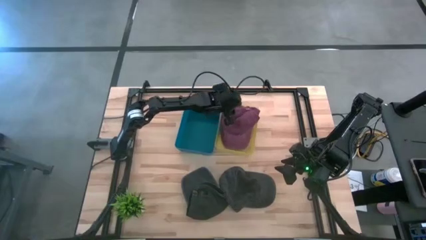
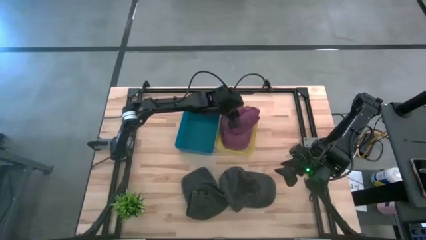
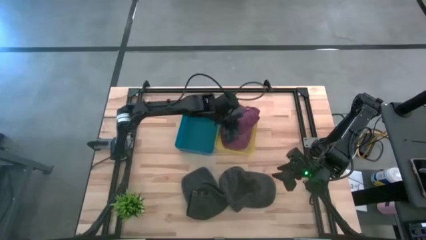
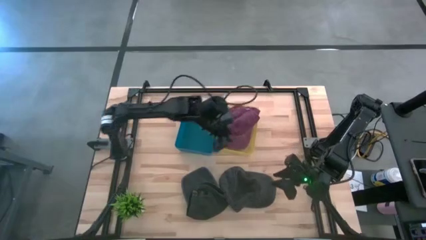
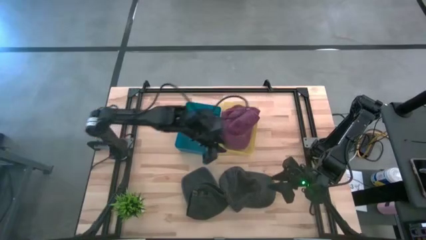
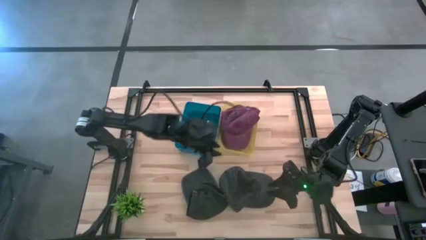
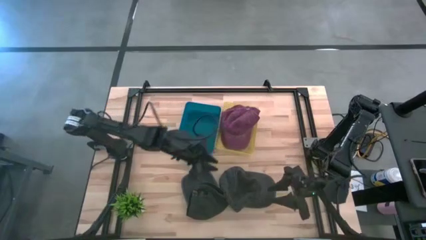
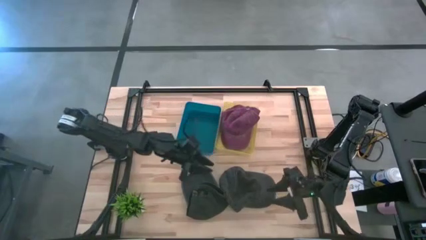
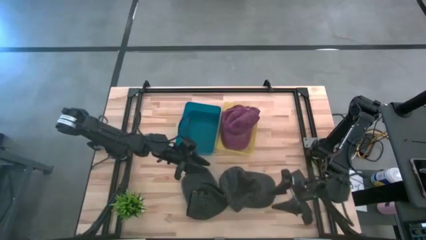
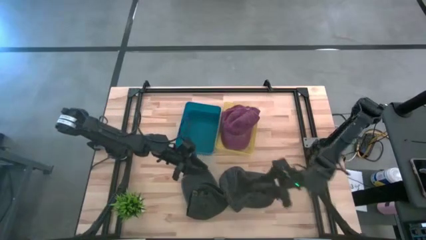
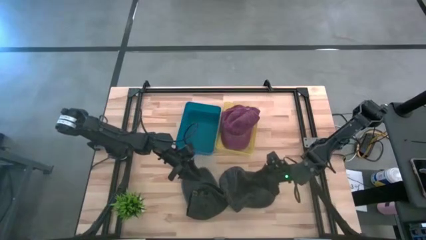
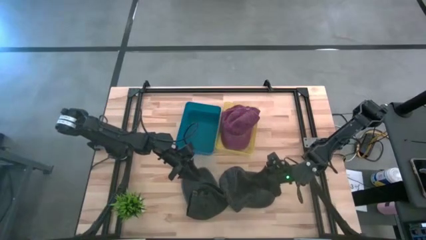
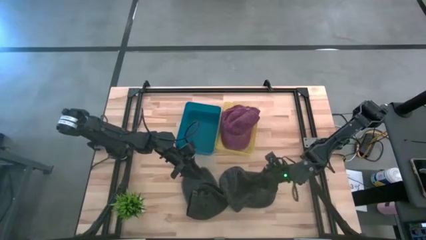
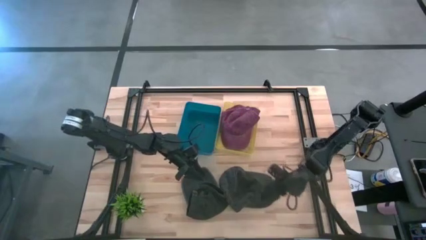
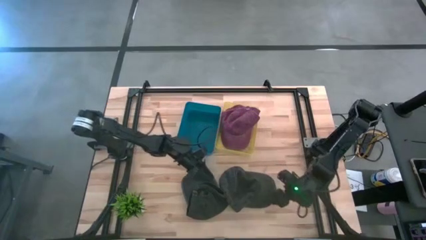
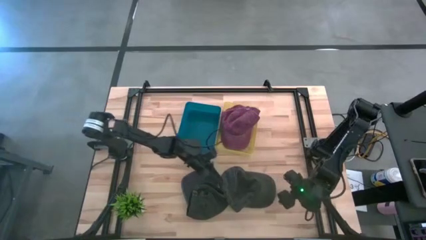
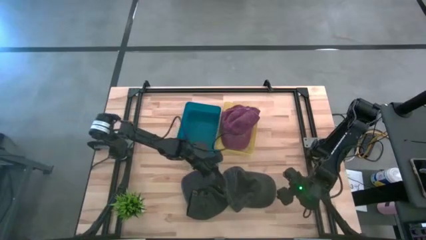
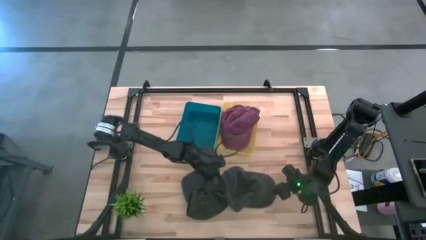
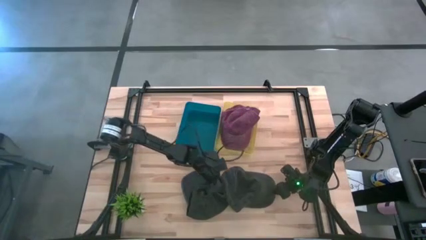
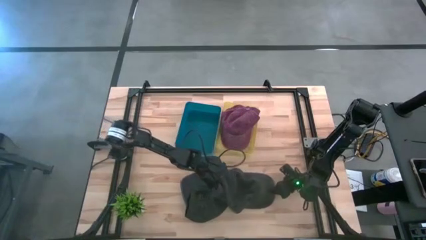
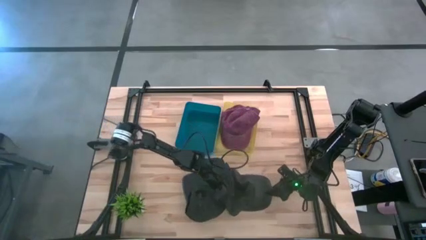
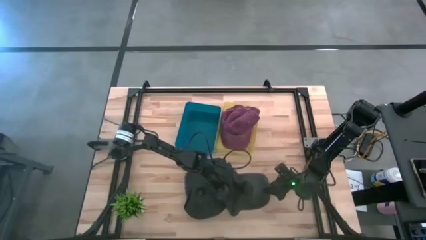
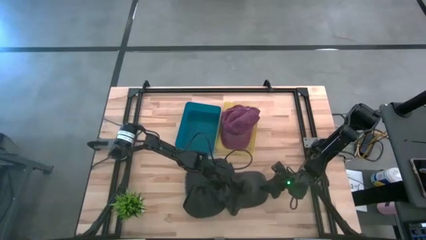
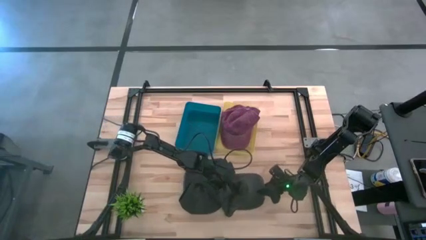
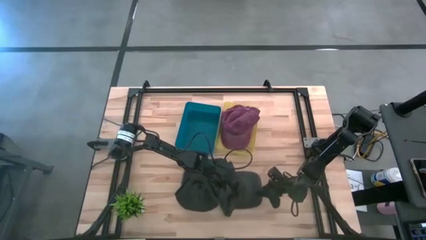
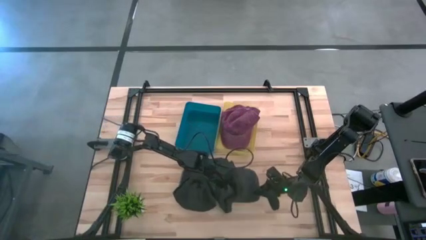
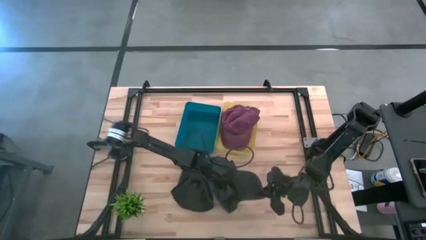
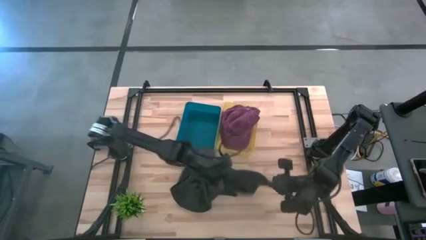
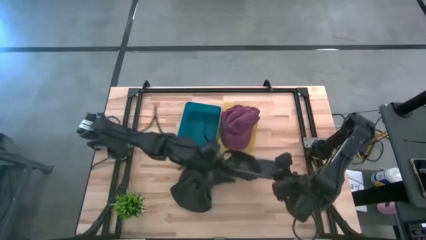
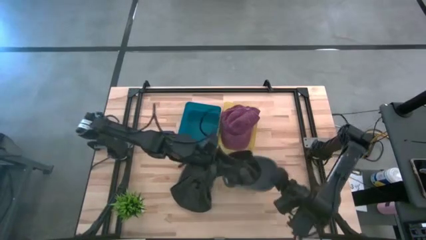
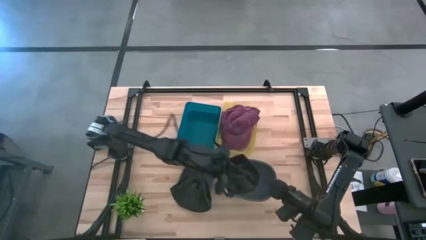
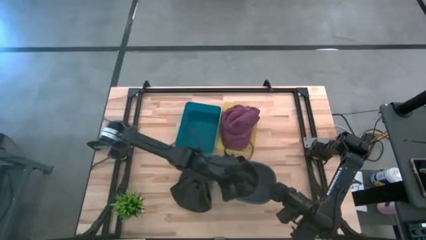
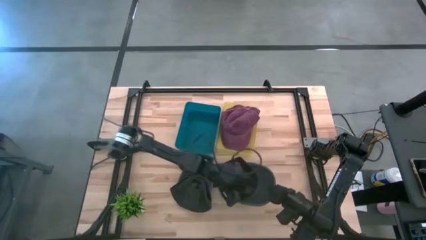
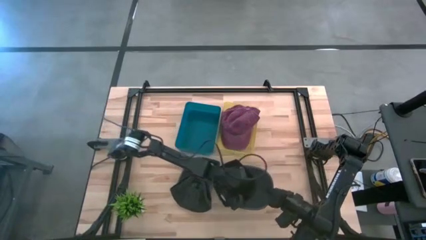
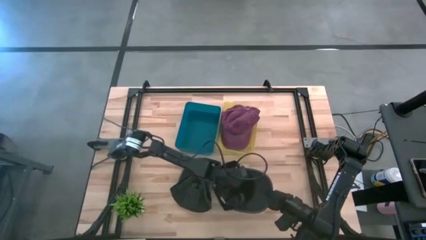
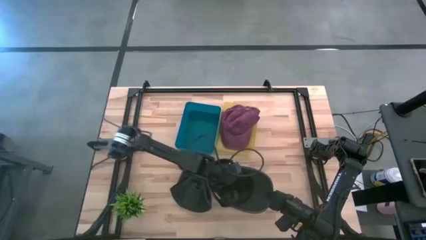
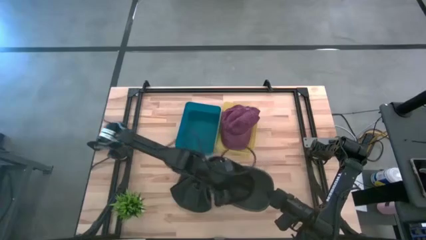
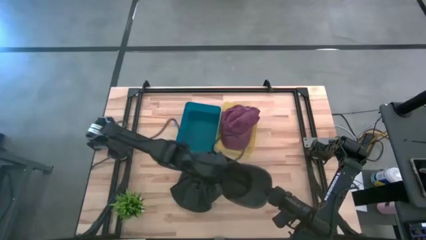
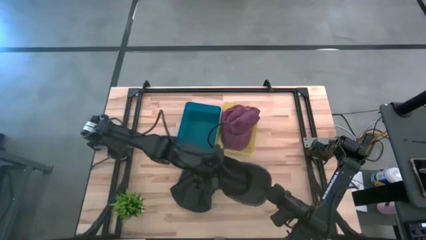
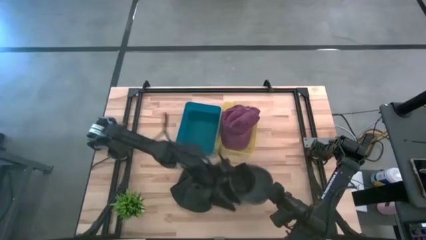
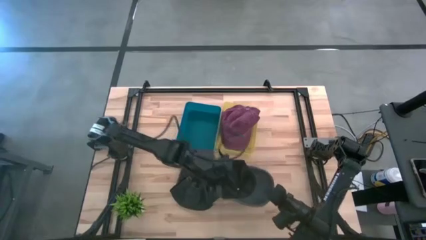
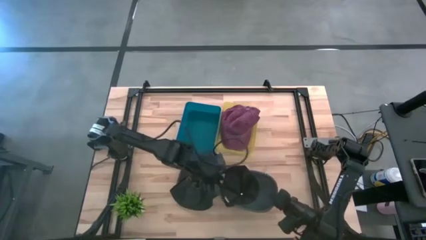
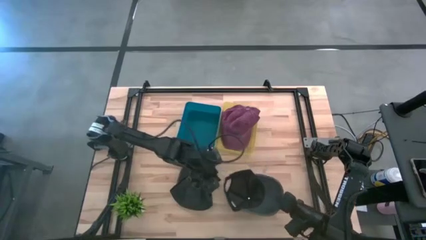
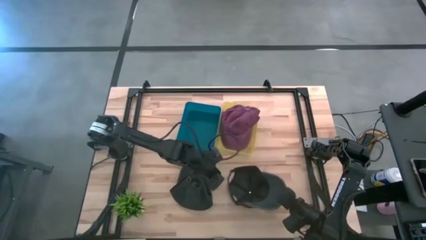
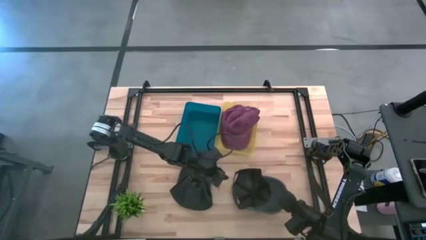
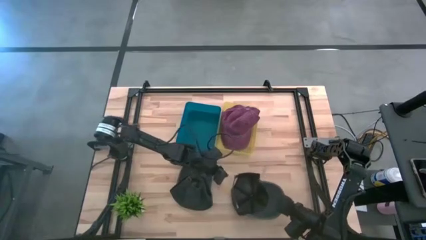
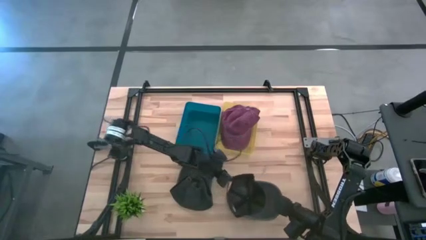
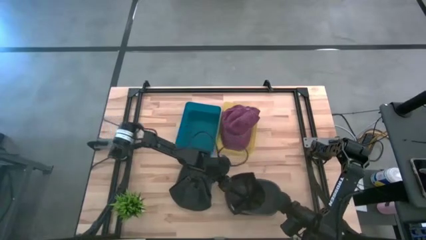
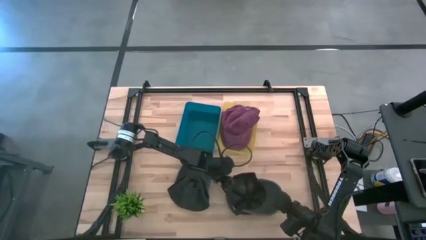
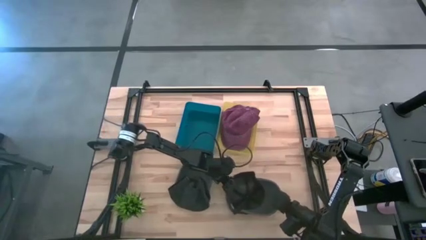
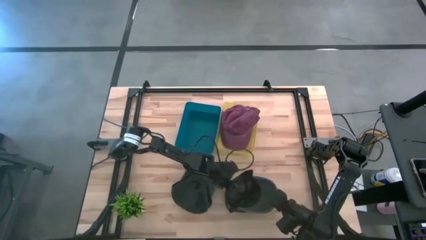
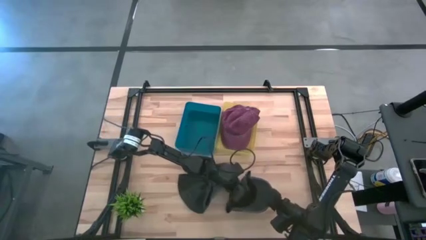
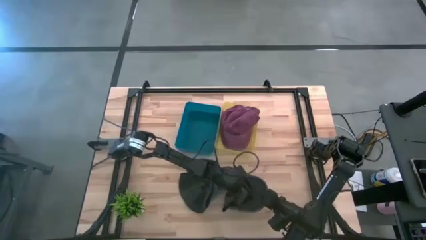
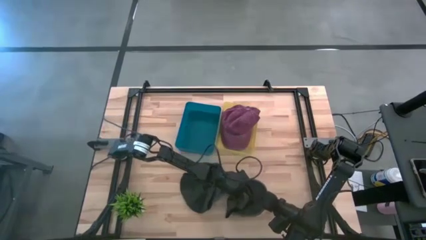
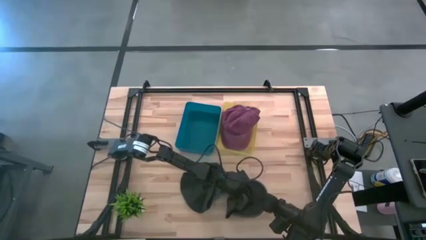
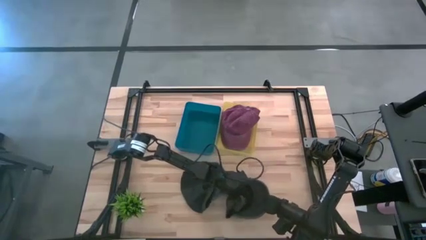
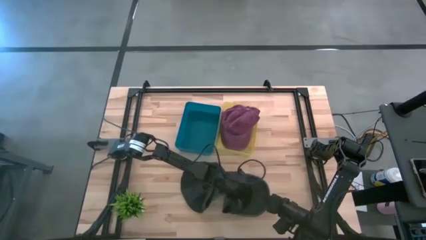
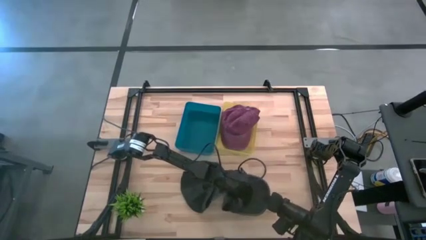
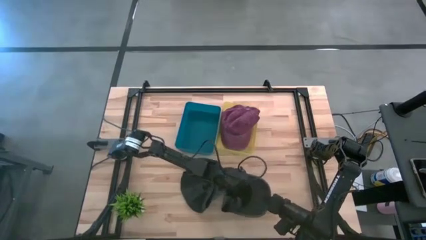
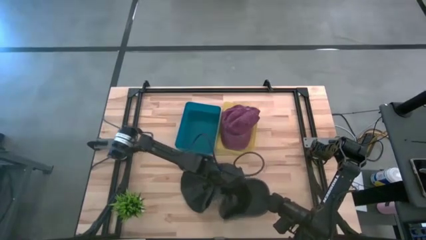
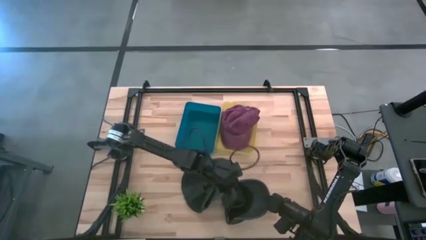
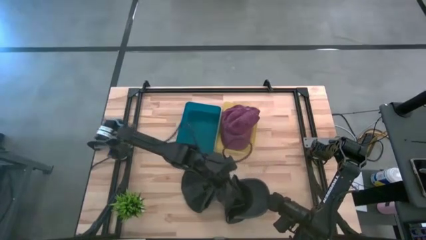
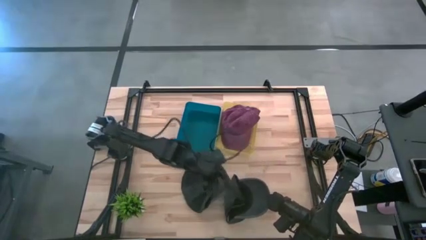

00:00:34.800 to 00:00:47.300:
Task: Pick & Place hat
Put the right black cap into the blue bin

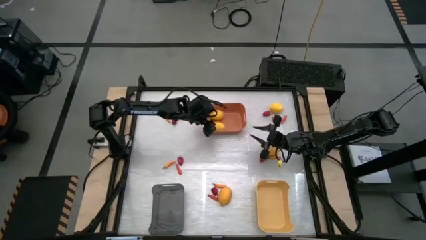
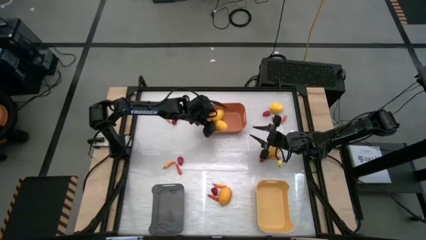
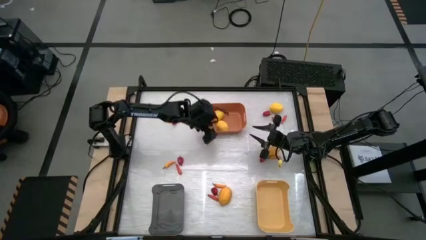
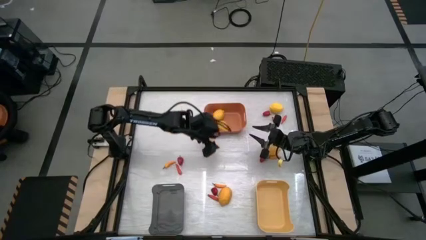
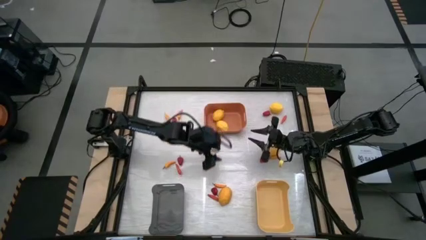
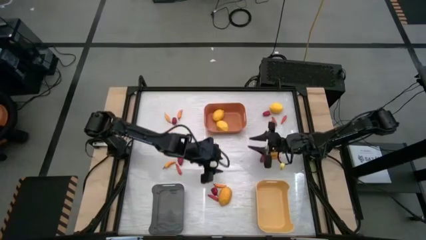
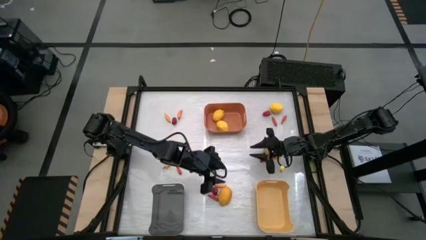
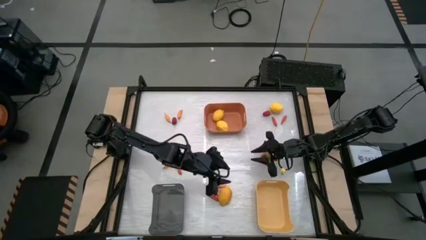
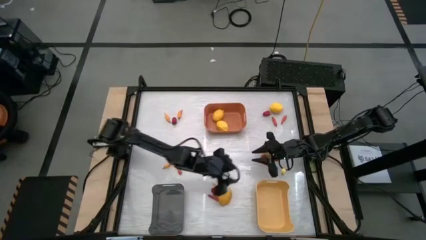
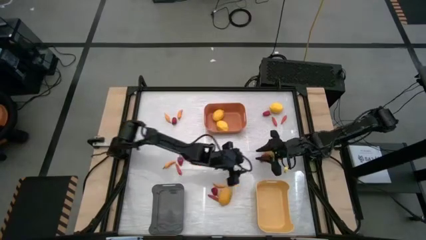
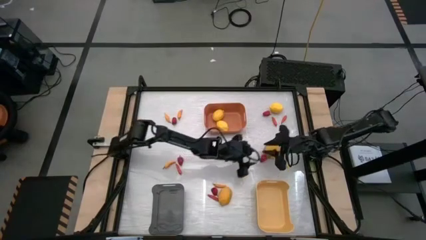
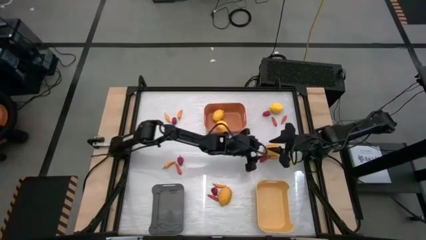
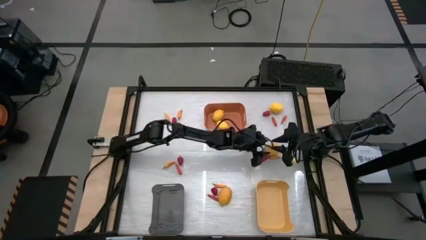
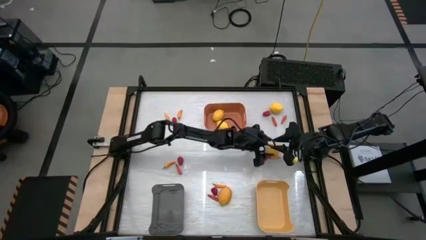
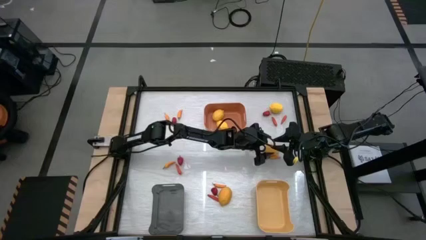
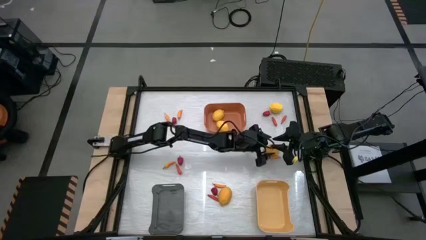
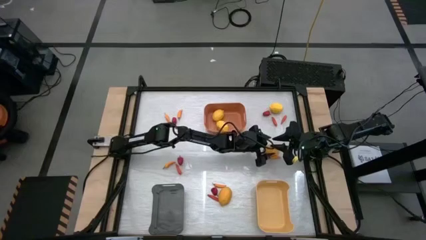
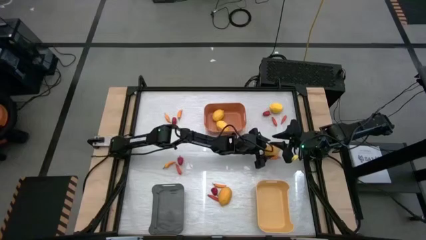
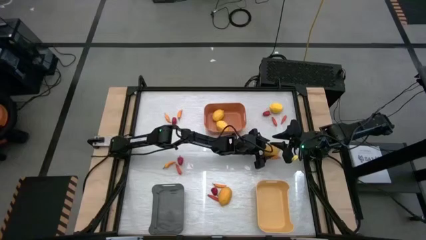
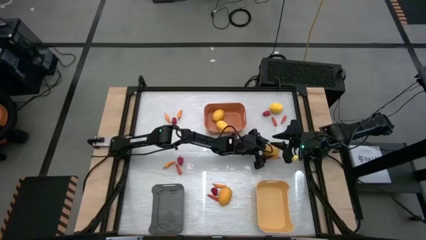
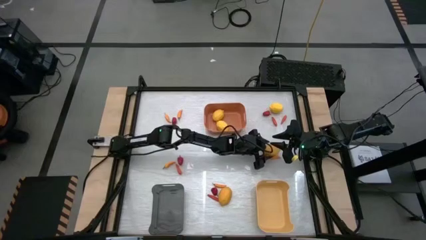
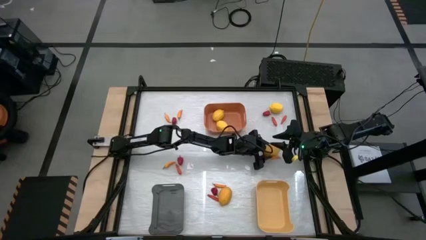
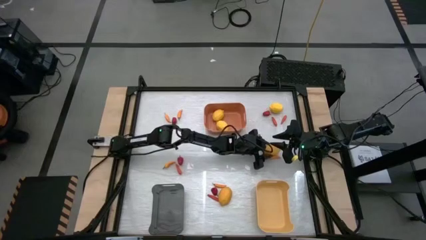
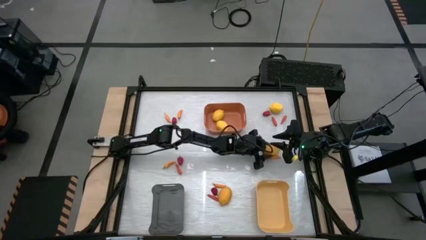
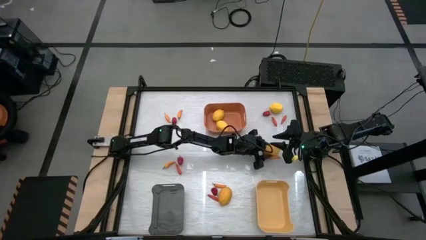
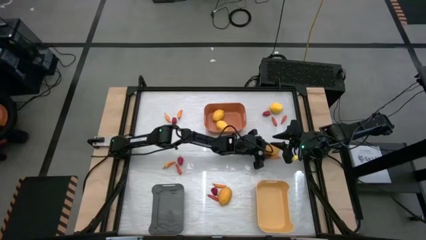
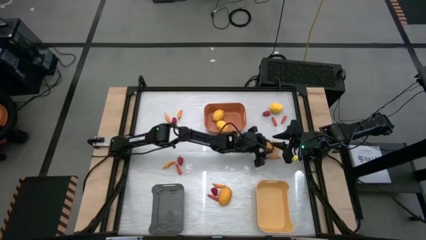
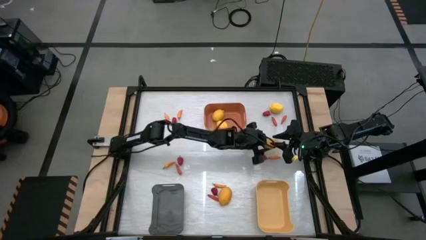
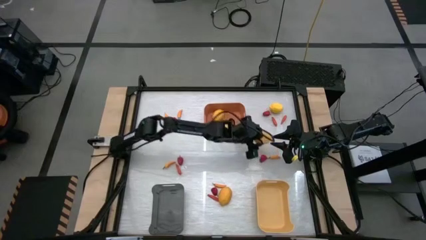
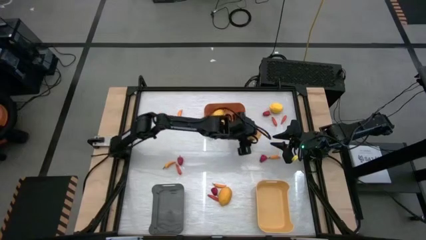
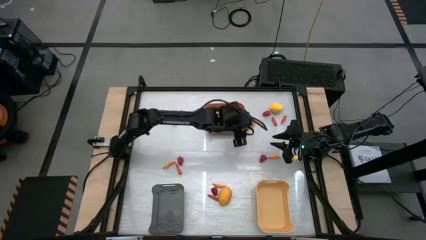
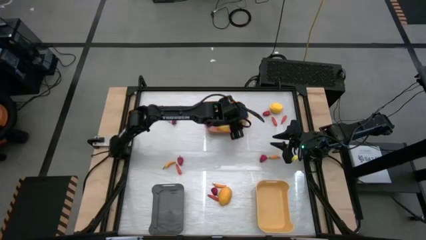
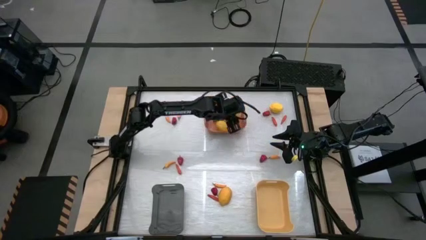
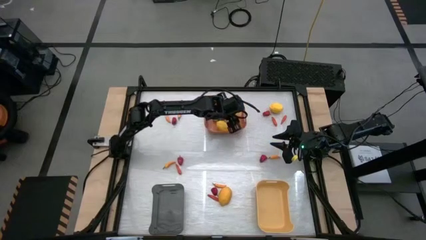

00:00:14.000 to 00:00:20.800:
Task: Sort produce into baskets
Put the yellow lemon into the orange bin
